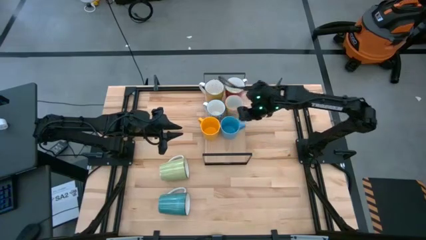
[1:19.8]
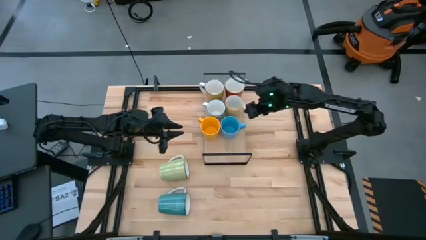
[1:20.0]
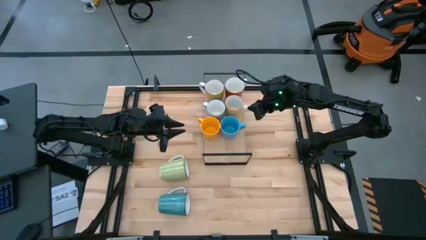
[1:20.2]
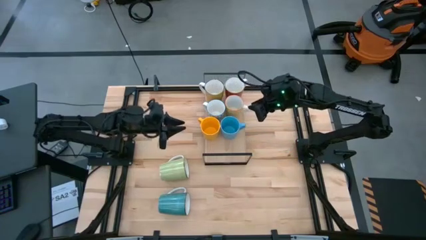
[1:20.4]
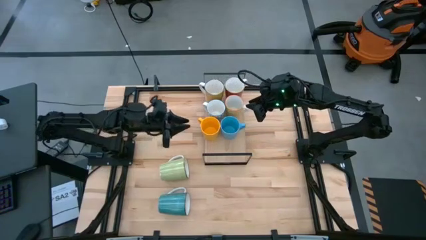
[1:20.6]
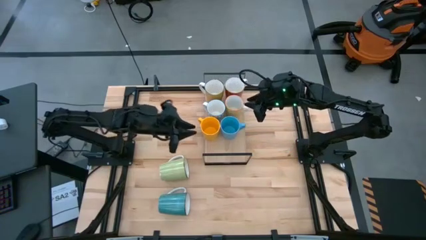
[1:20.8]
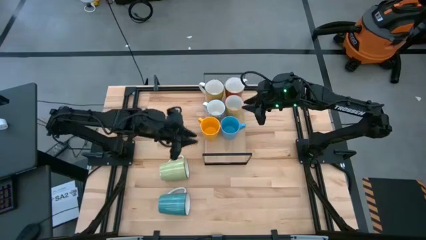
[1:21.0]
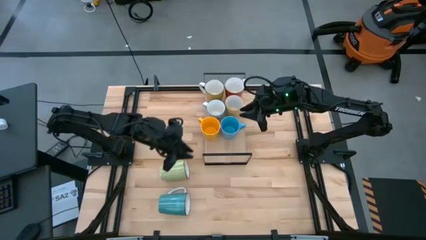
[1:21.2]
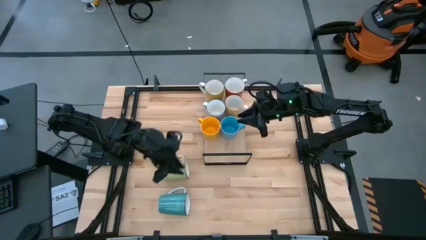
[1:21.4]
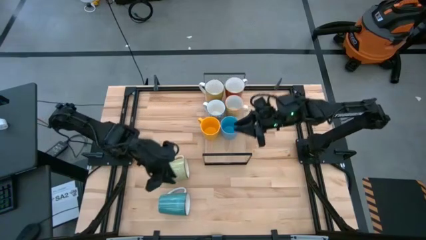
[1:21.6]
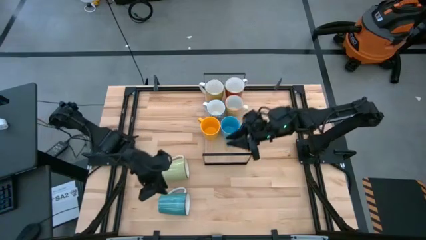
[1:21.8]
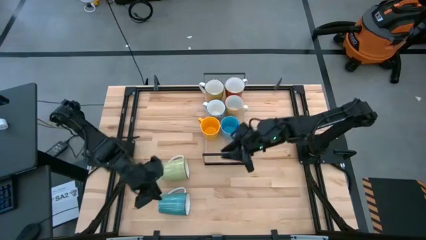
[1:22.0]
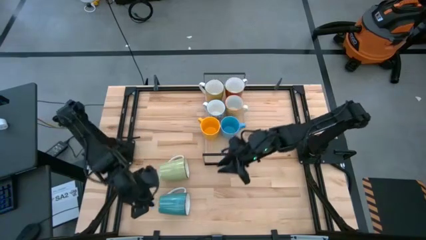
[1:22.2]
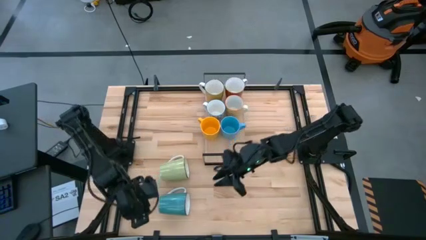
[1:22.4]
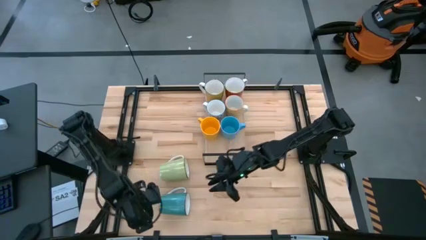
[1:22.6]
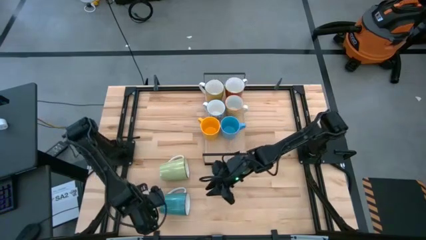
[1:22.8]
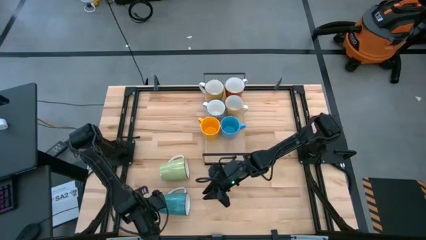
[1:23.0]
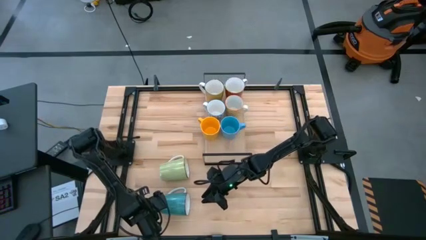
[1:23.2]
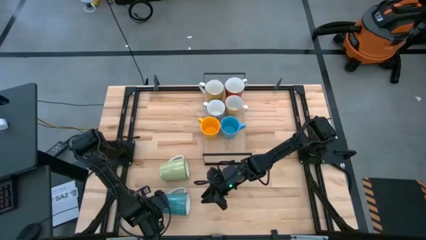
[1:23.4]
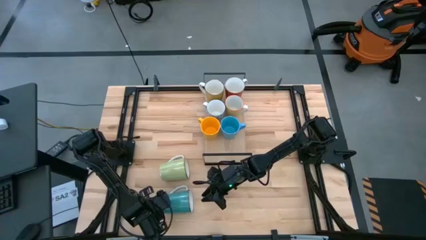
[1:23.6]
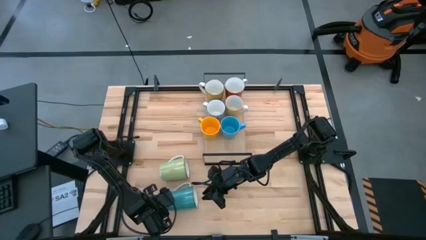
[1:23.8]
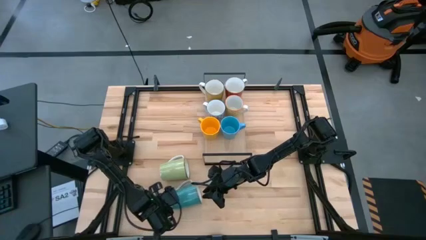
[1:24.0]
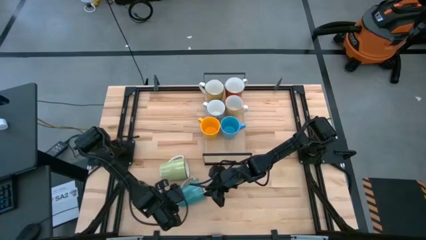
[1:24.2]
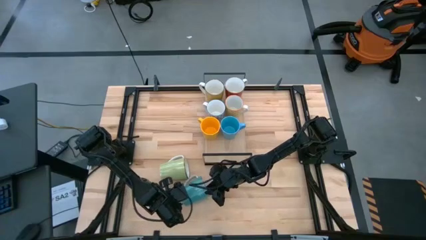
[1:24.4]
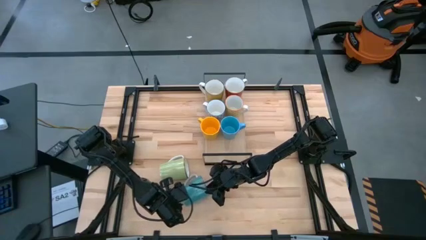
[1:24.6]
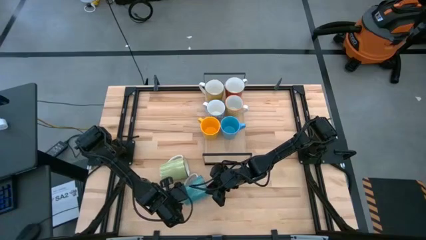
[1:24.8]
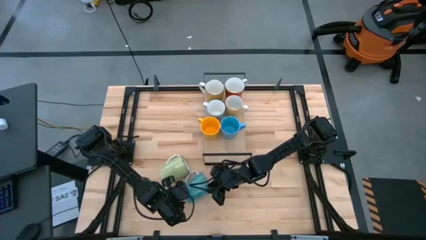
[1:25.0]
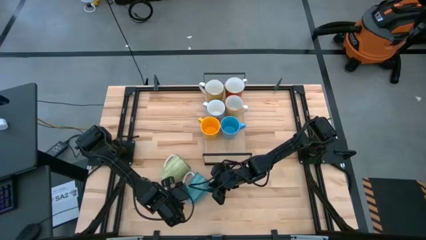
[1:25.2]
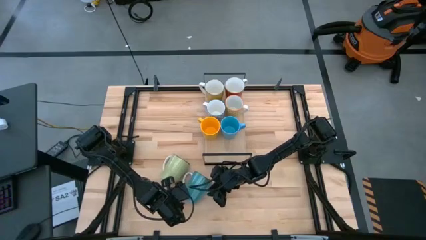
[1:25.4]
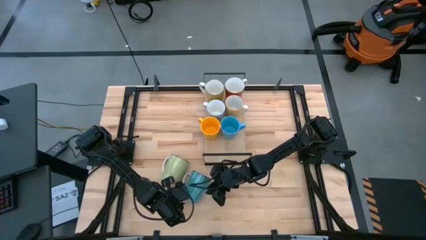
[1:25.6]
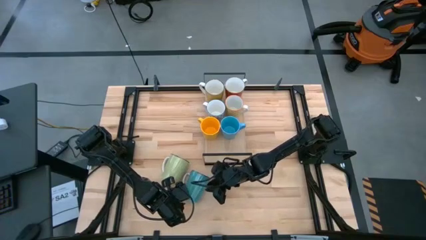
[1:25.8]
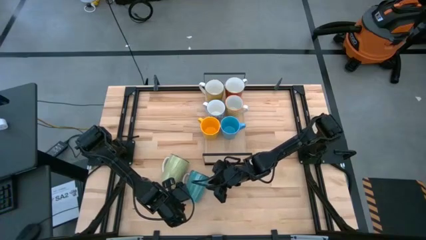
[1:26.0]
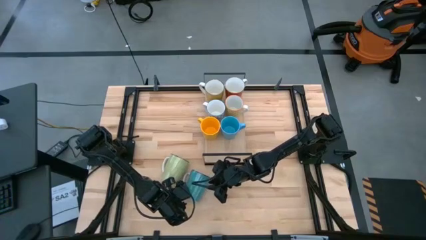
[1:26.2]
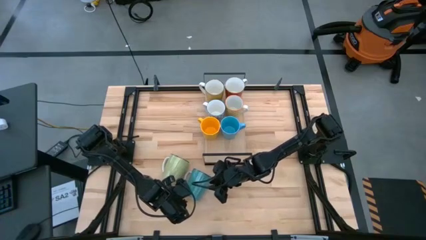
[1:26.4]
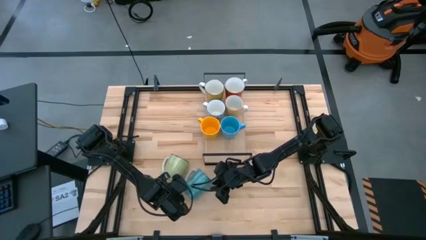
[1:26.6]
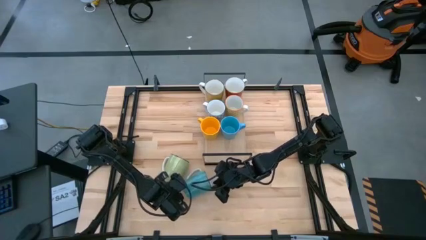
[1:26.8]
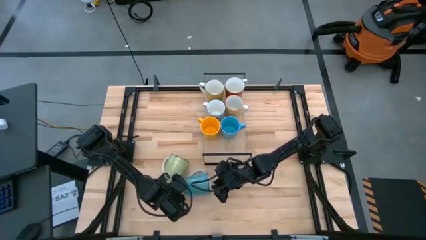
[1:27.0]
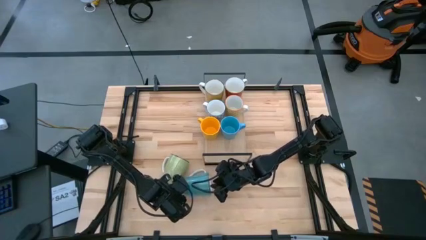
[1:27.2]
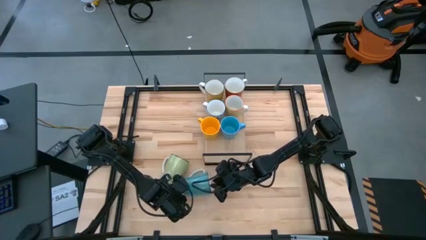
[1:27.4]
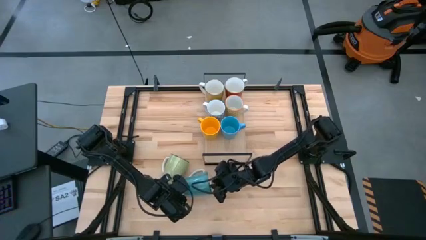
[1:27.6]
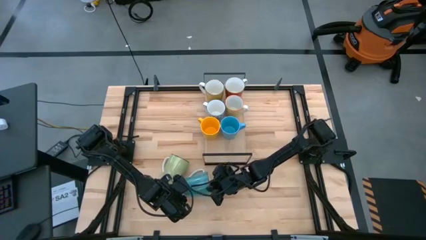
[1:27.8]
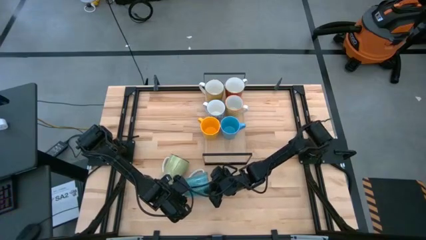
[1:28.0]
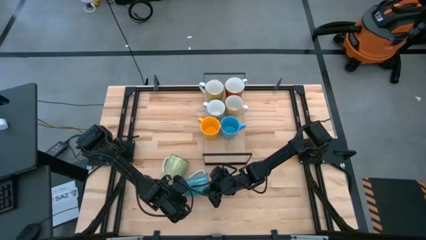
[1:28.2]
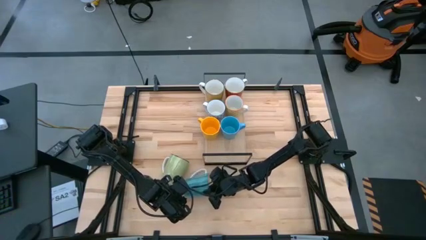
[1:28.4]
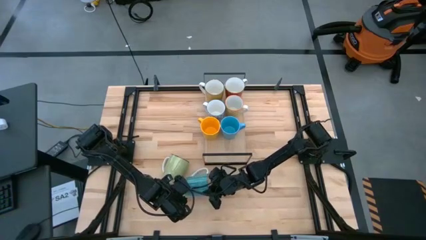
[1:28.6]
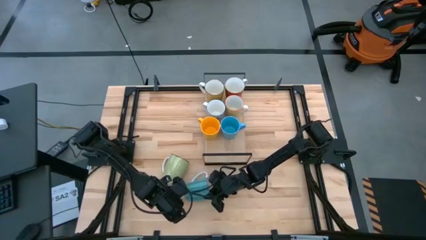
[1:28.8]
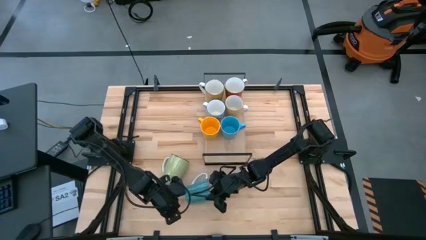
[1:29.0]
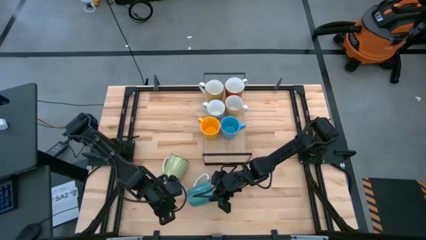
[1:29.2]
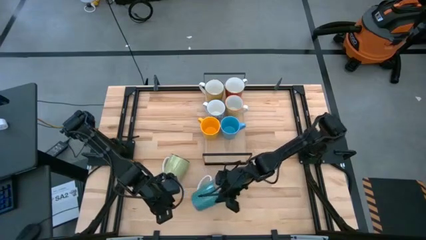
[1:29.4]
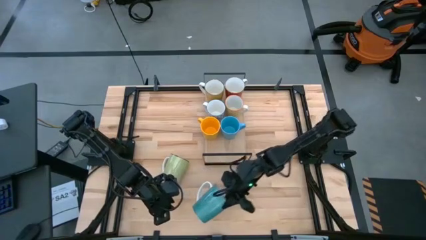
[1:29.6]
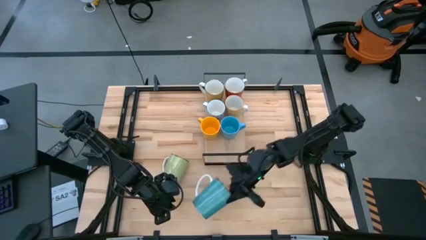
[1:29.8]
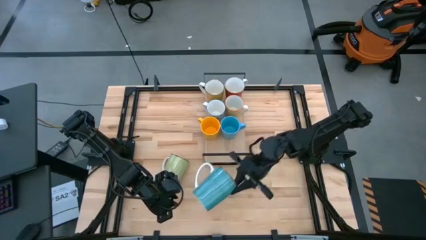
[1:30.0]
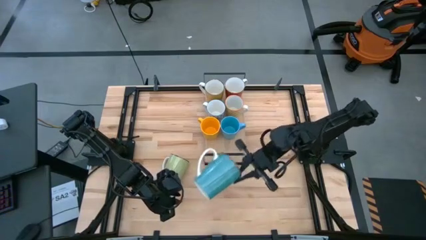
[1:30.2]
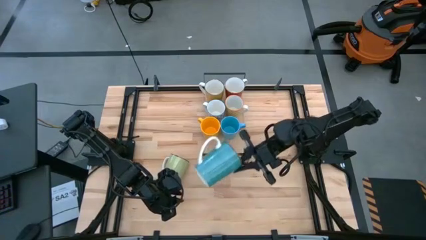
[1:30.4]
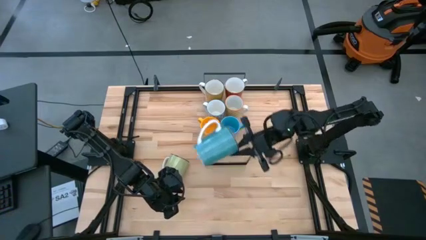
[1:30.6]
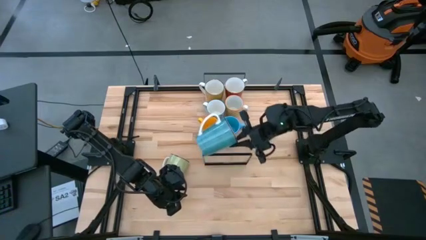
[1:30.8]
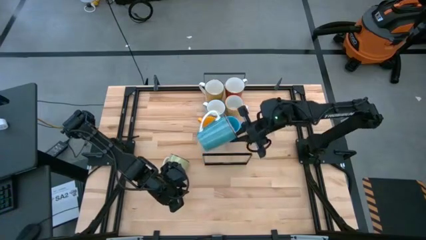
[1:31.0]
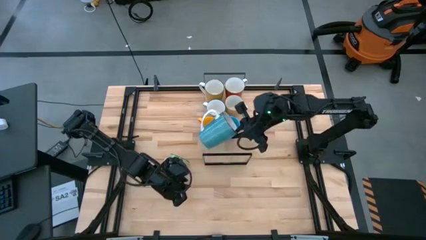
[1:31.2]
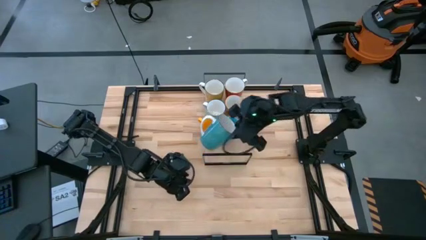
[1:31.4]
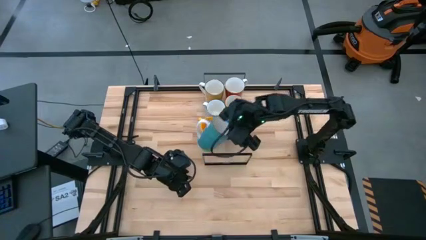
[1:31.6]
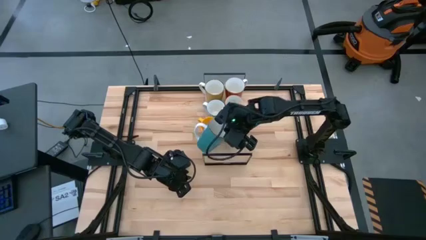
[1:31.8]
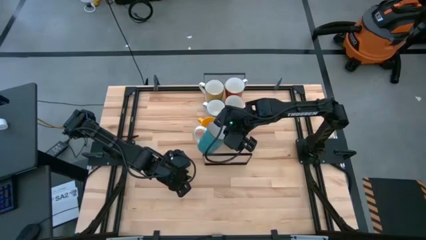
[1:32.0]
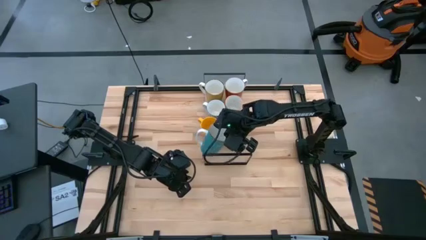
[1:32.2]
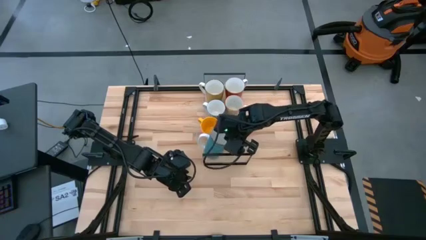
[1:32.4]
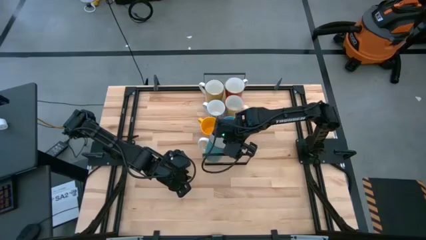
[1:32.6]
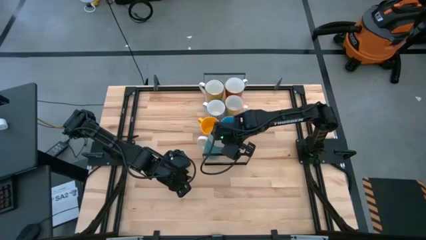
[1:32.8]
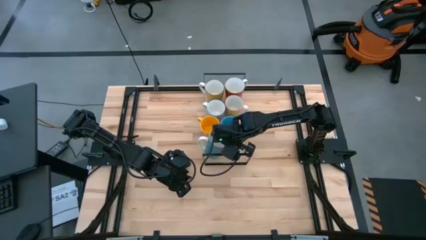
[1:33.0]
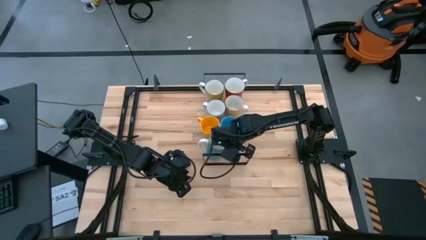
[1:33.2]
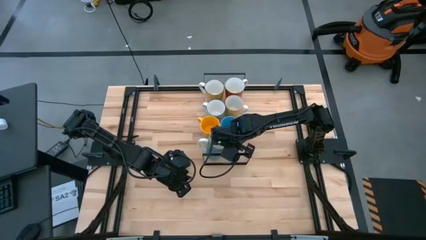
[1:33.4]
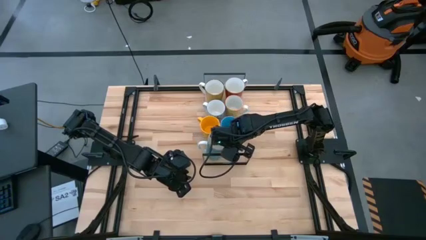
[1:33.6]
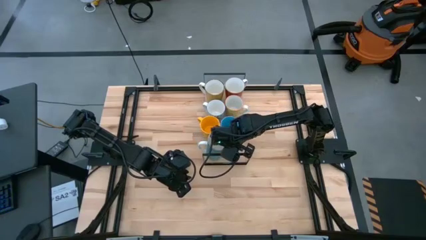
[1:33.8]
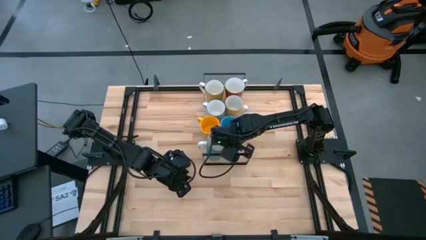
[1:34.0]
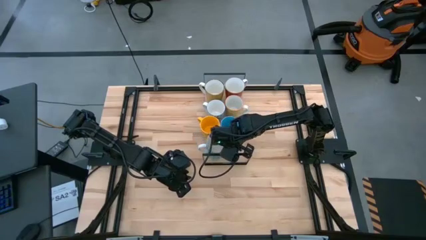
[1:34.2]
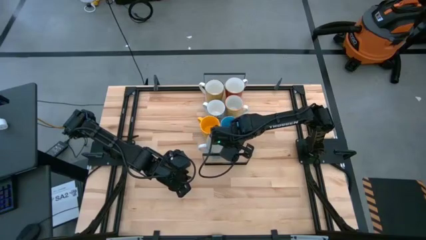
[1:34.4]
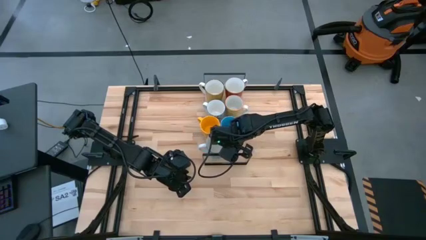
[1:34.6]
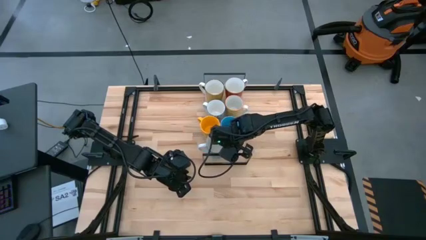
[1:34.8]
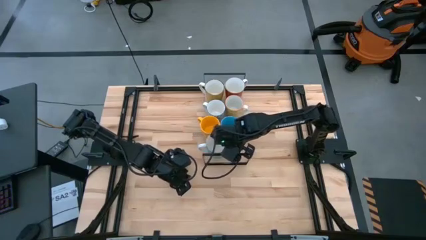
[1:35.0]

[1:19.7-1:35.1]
Task: Place coffee mugs
Put the light blue mug on the shelf

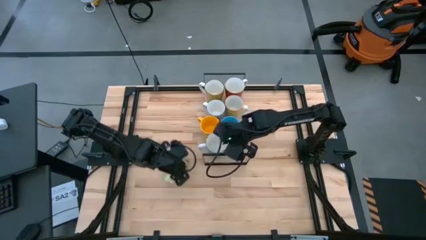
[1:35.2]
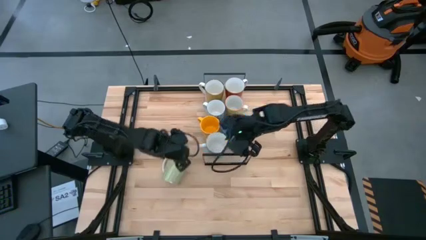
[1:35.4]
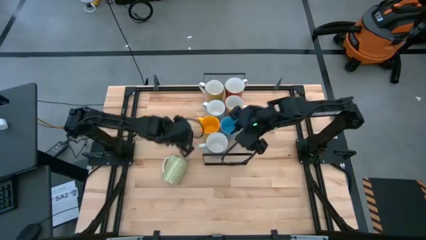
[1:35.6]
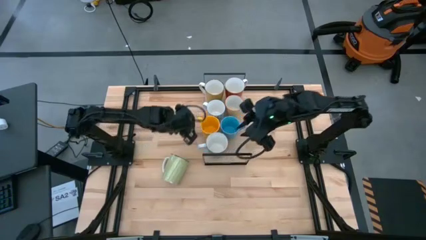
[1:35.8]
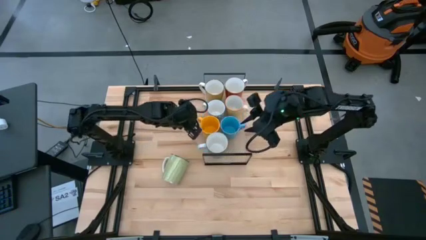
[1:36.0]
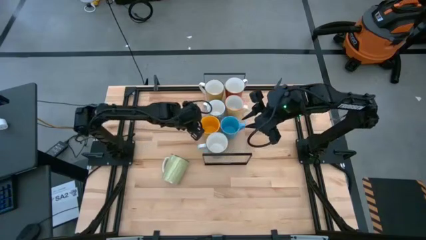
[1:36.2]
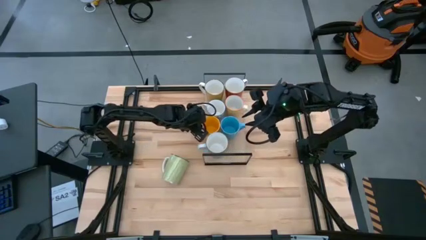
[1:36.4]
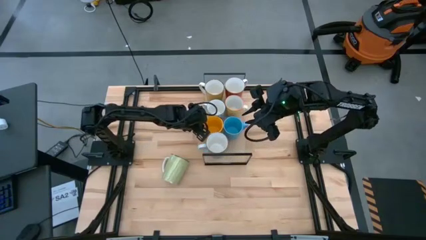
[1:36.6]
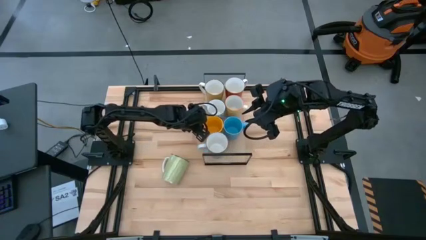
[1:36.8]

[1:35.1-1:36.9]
Adjust the yellow mug on the shelf
